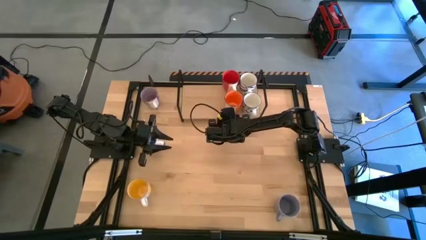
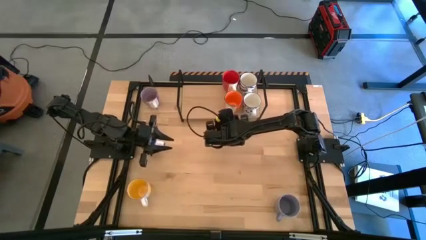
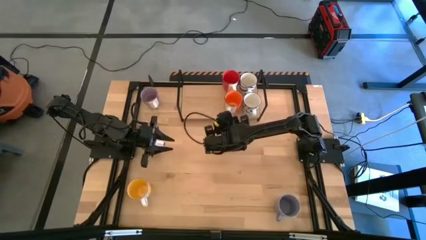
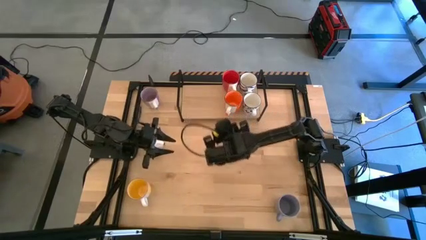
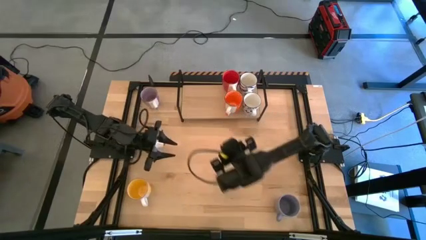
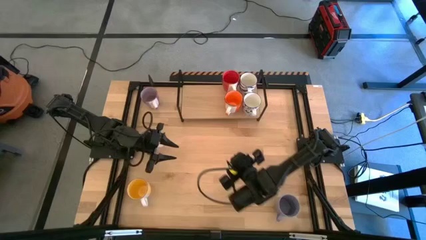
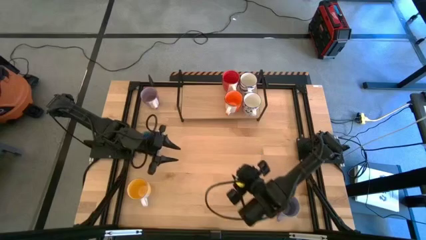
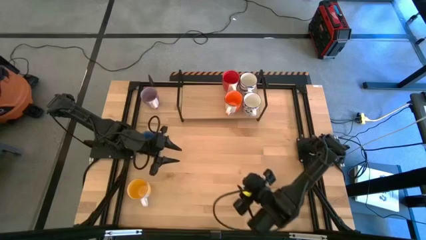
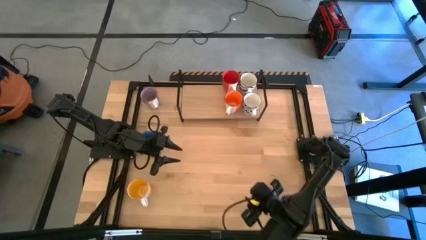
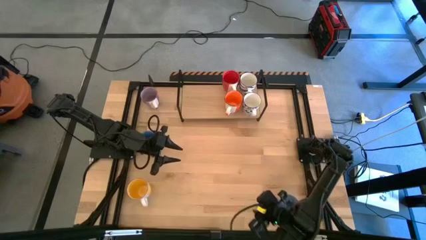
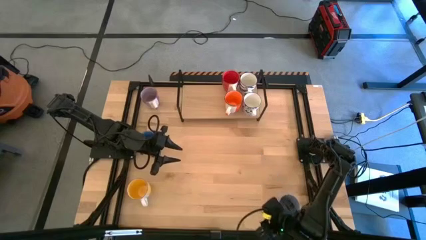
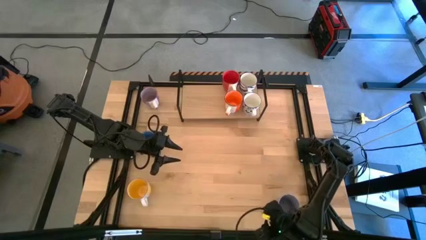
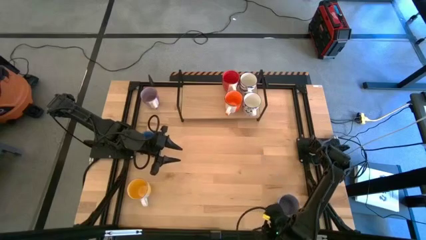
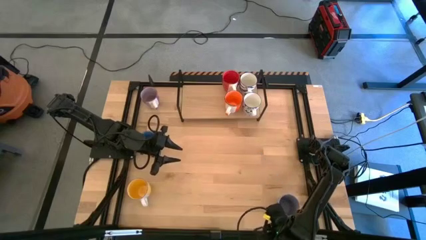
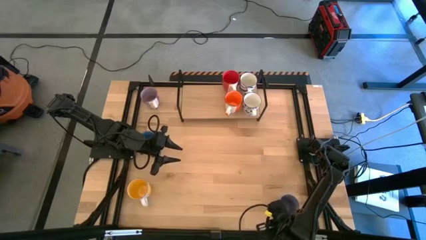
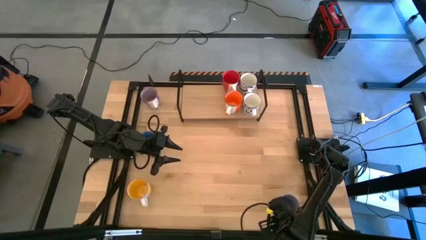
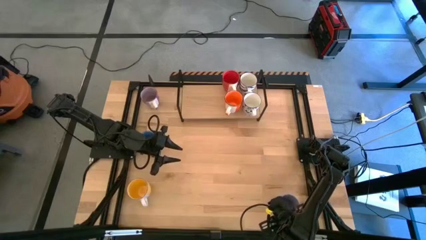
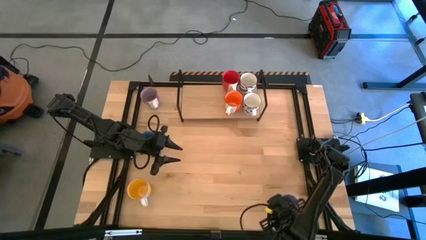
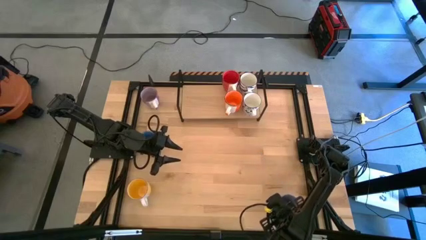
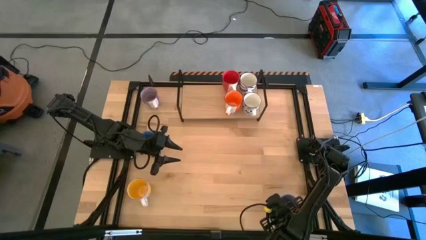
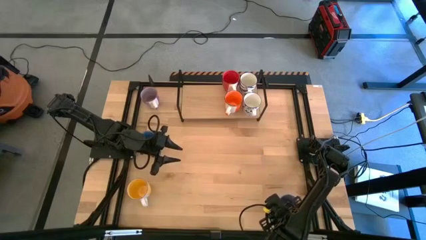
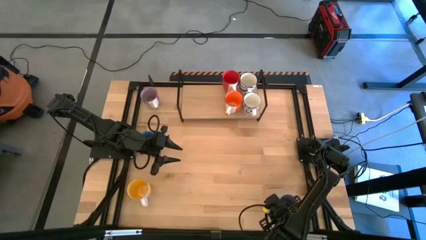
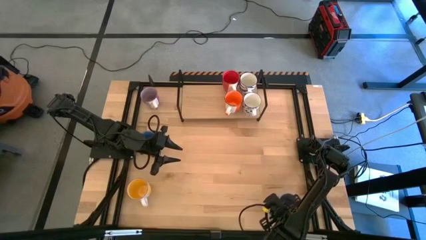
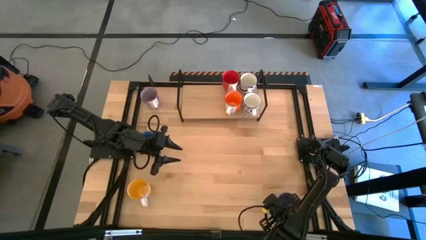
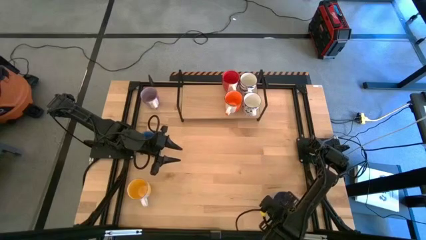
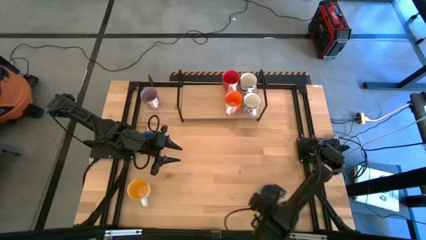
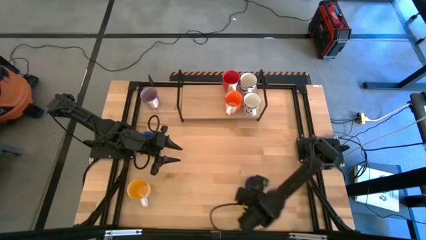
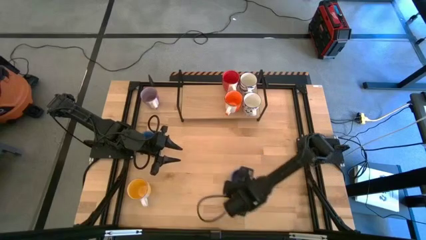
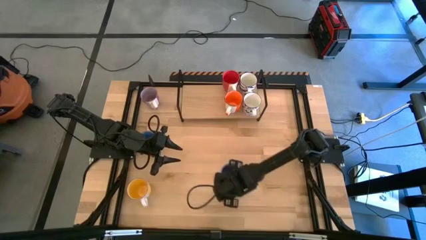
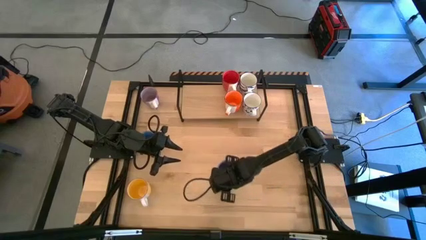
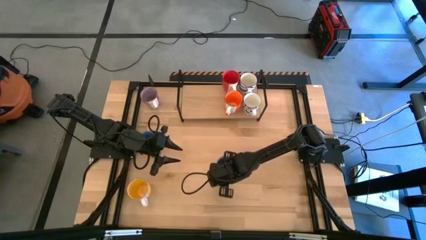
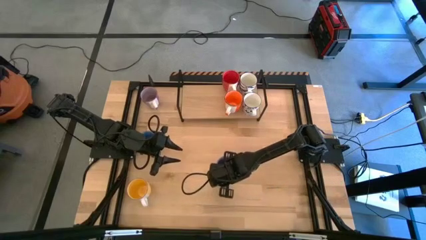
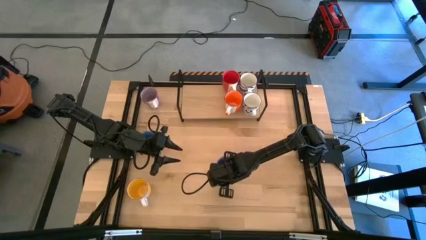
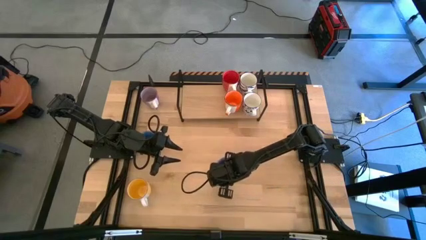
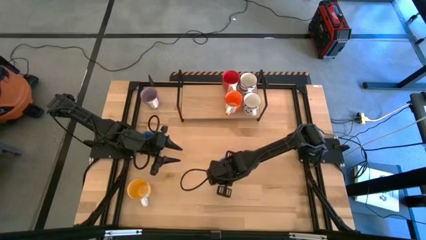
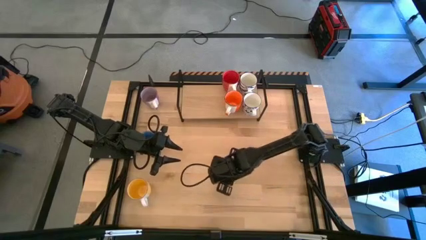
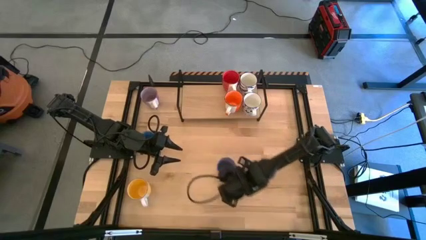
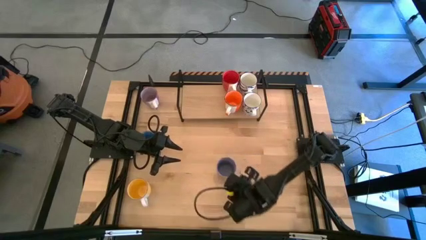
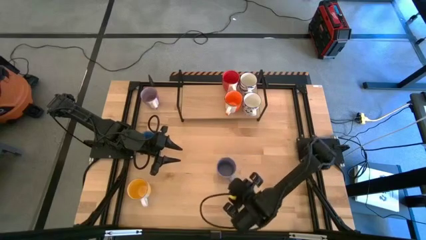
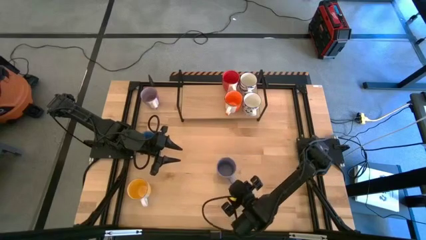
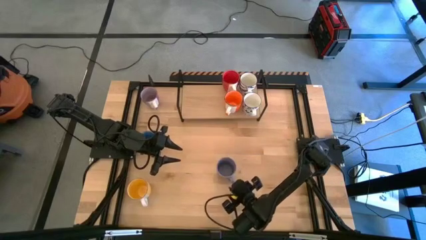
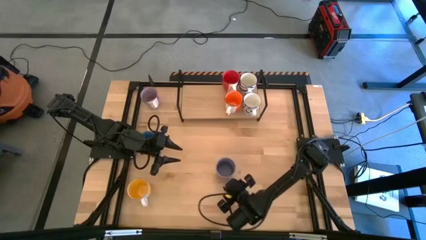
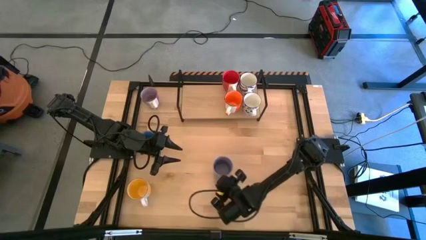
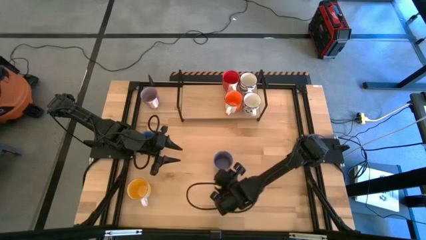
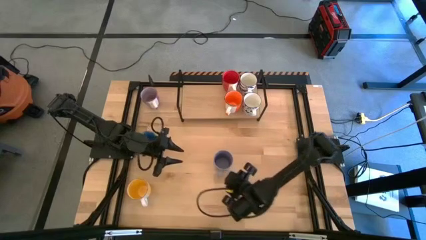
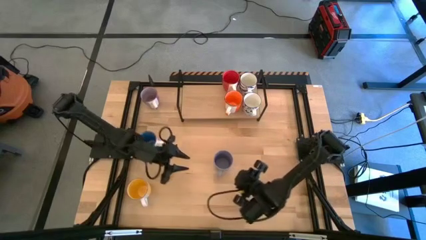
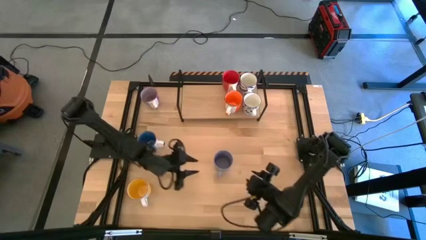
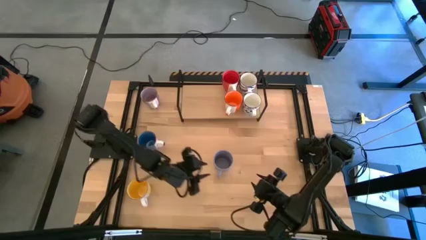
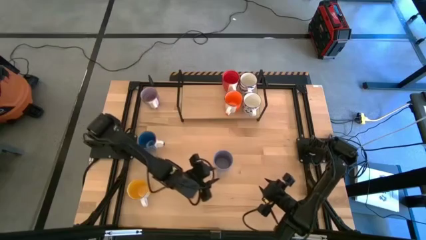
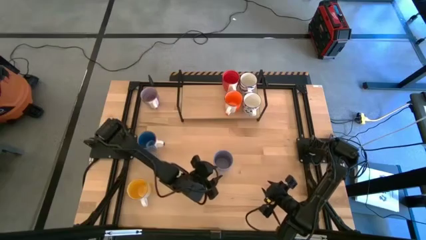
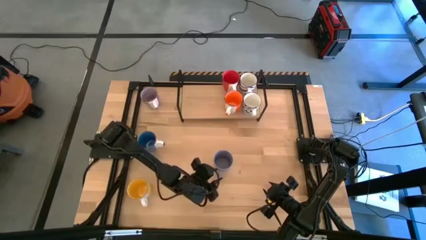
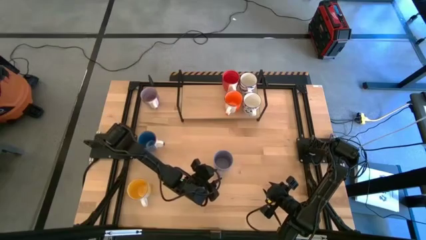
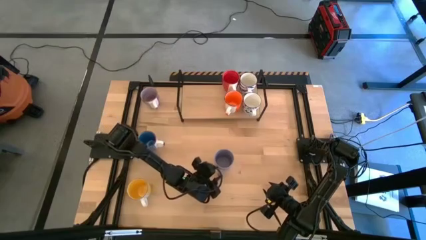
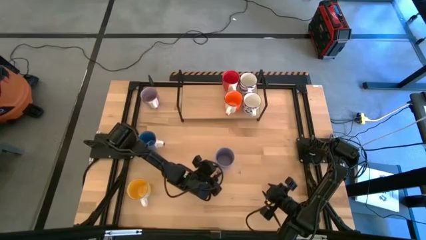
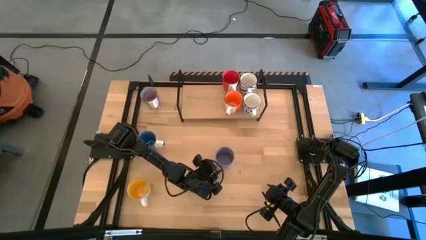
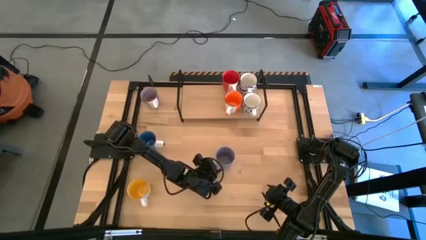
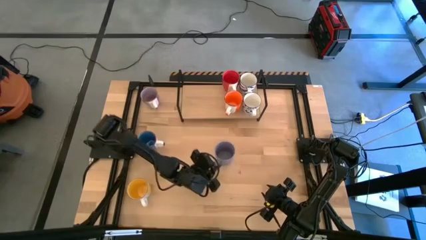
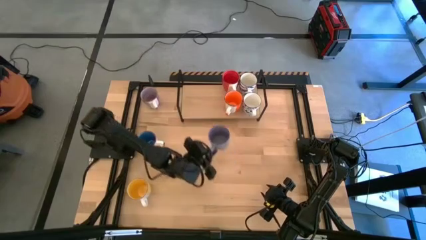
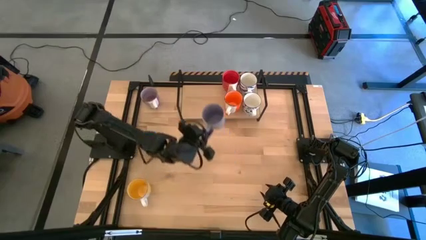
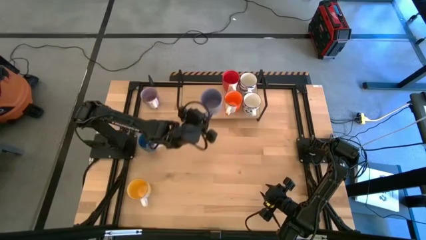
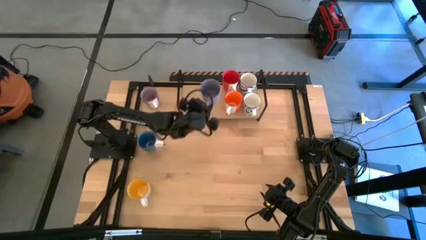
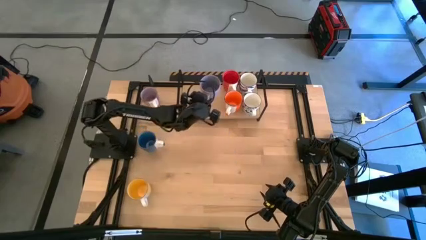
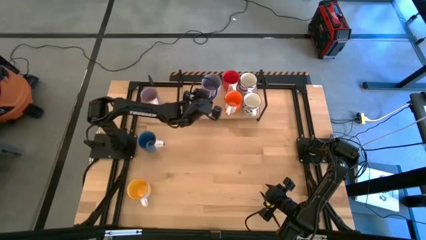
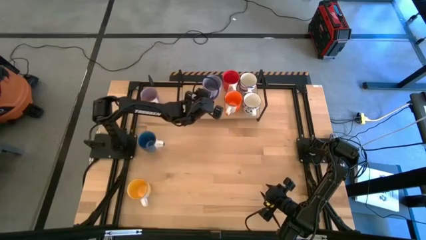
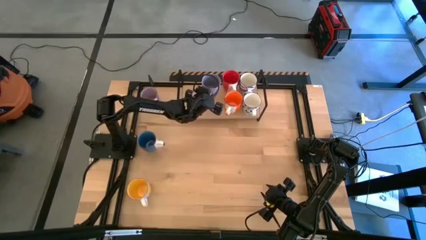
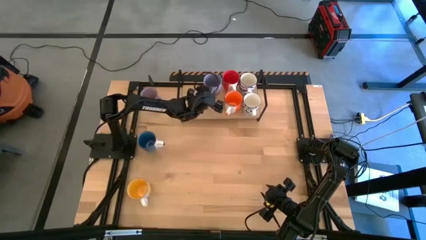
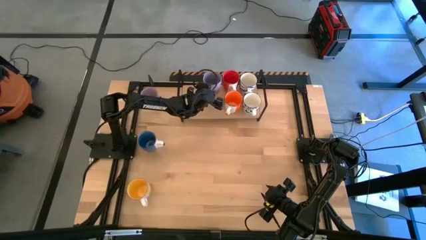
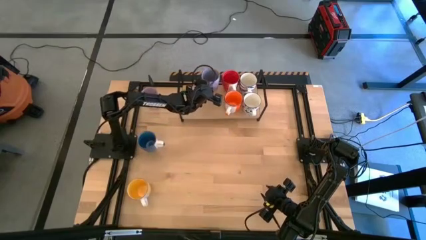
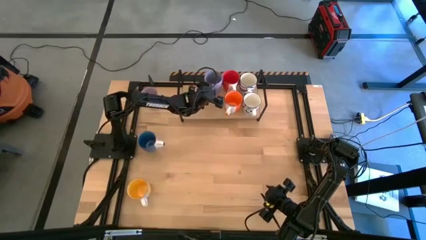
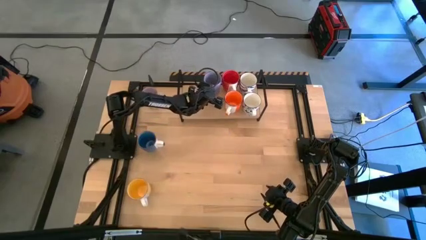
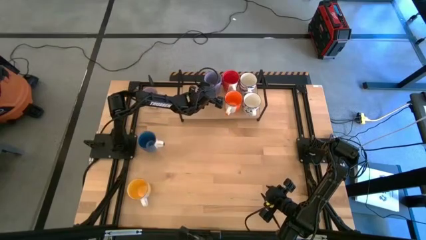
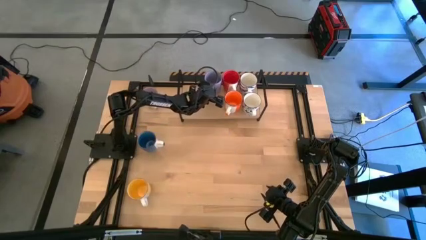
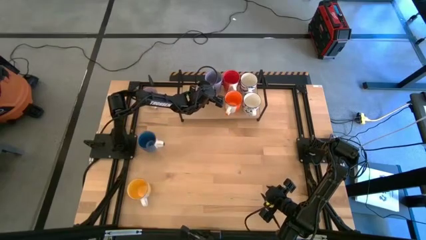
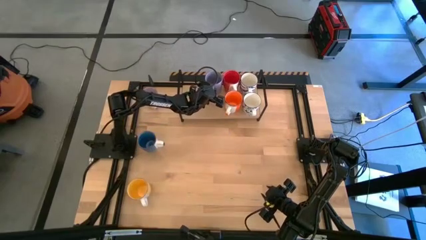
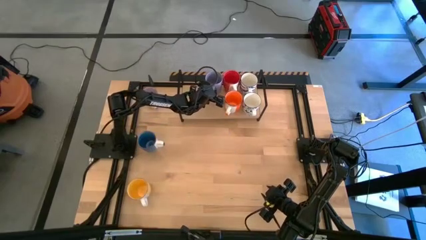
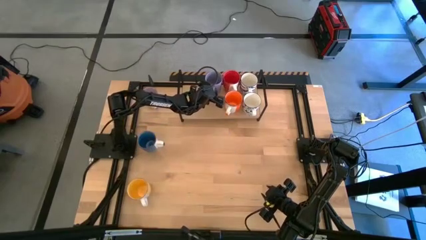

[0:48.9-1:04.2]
Task: Place coffee mugs
Put the bottom purple mug on the shelf
